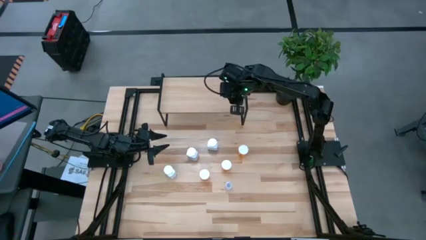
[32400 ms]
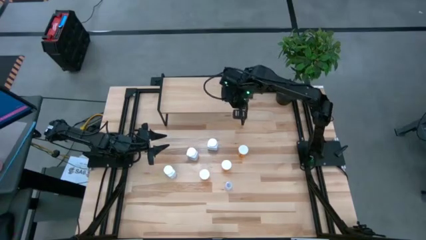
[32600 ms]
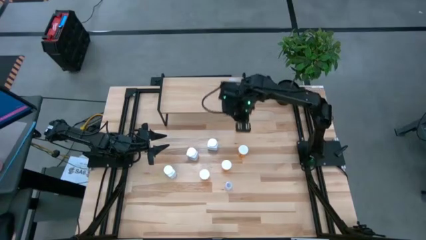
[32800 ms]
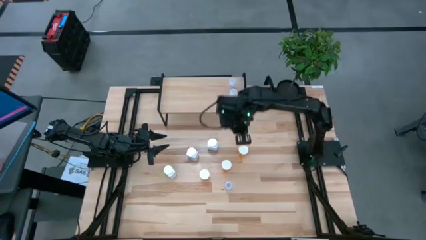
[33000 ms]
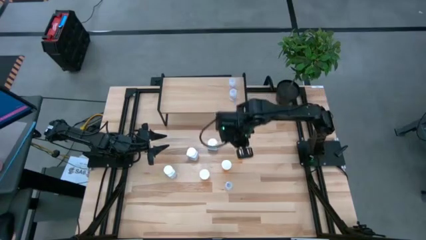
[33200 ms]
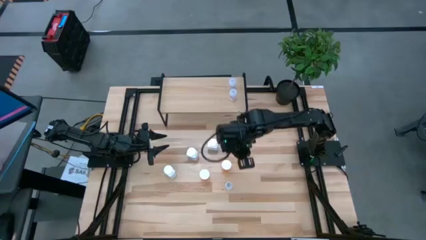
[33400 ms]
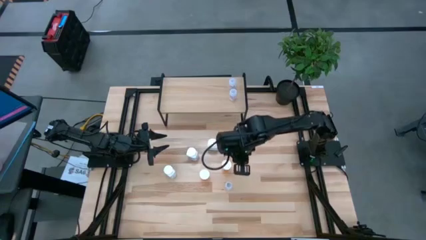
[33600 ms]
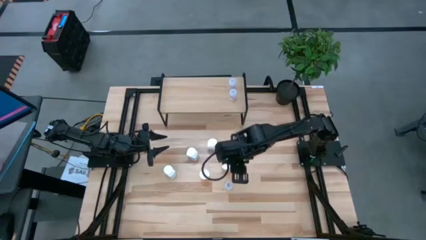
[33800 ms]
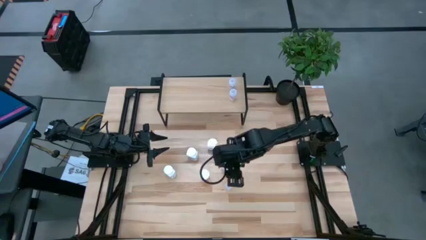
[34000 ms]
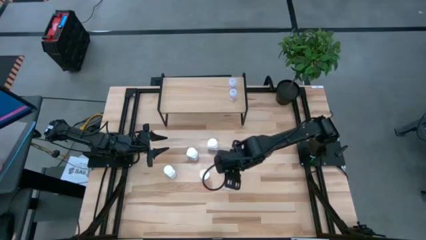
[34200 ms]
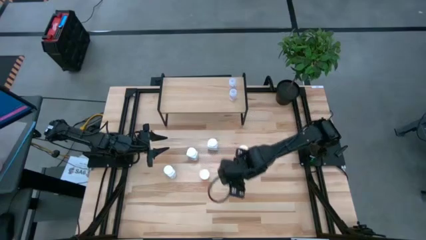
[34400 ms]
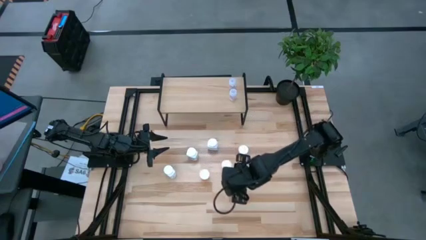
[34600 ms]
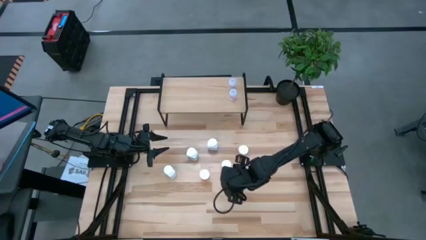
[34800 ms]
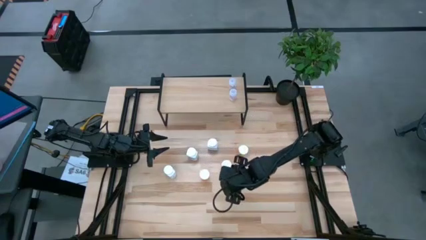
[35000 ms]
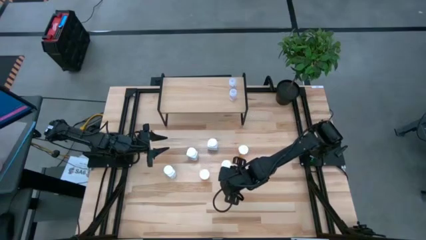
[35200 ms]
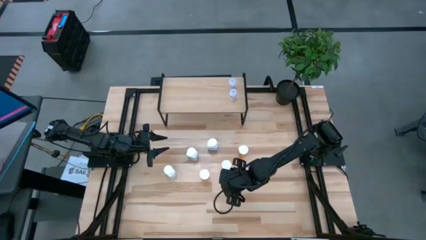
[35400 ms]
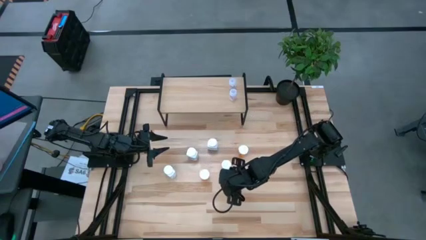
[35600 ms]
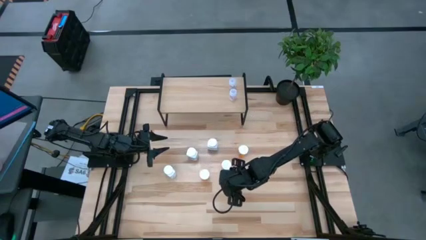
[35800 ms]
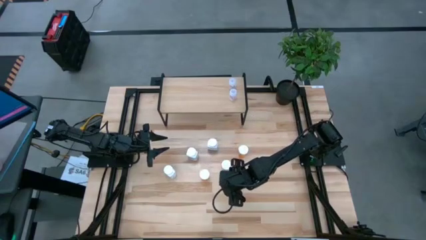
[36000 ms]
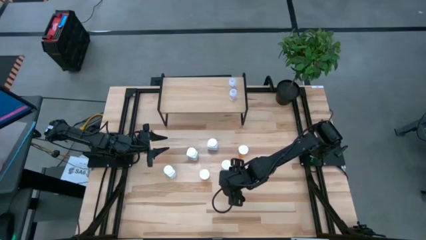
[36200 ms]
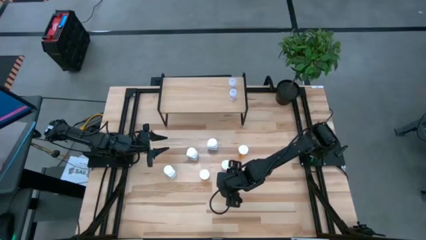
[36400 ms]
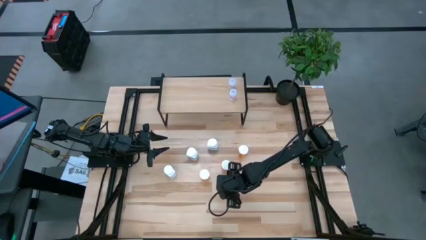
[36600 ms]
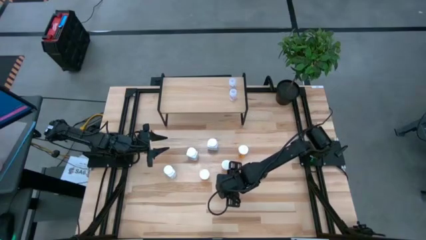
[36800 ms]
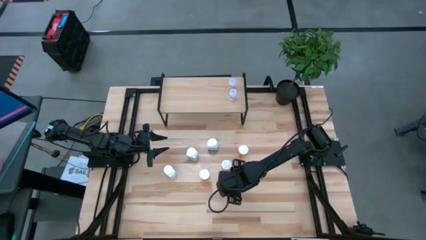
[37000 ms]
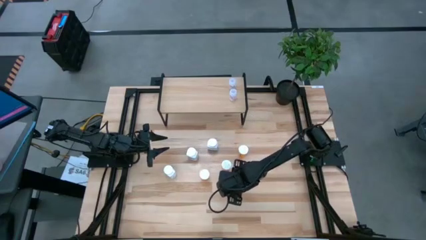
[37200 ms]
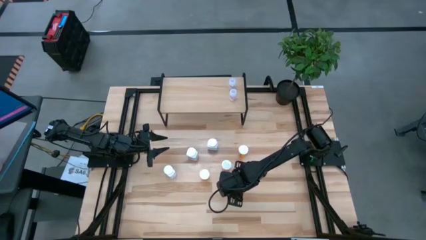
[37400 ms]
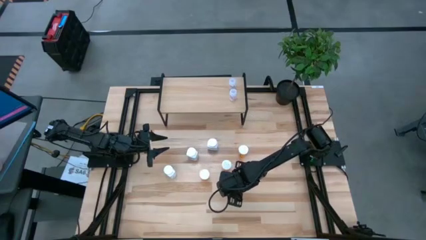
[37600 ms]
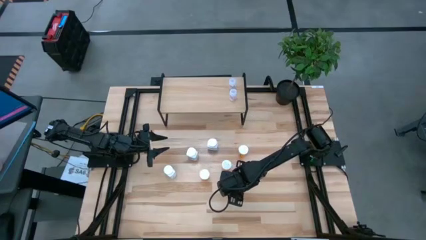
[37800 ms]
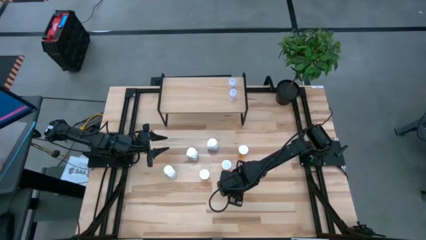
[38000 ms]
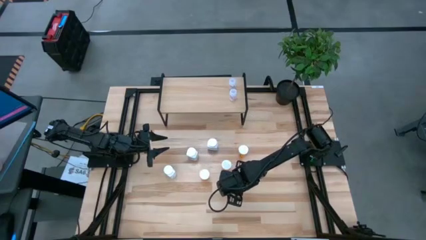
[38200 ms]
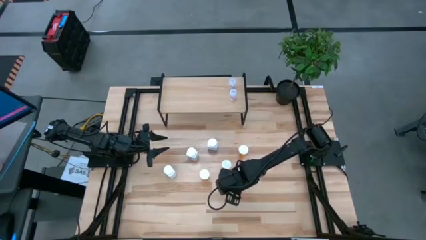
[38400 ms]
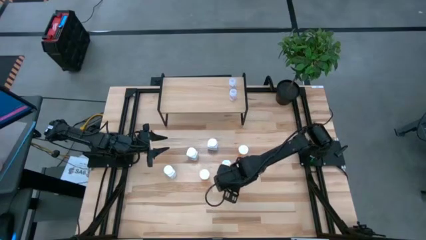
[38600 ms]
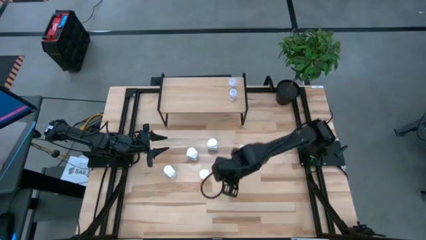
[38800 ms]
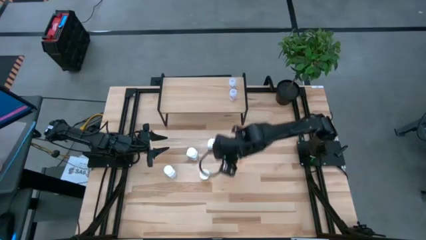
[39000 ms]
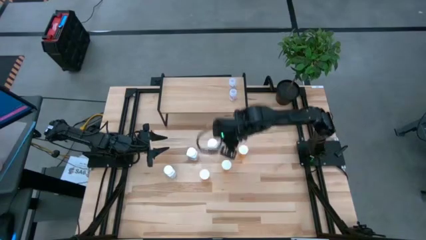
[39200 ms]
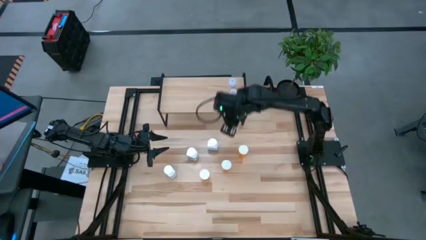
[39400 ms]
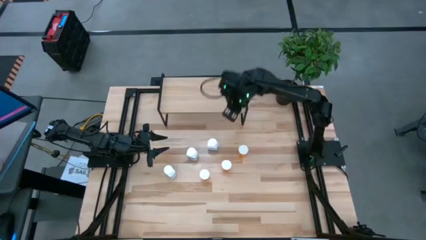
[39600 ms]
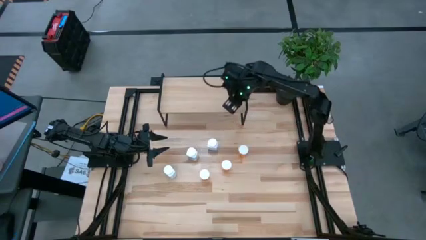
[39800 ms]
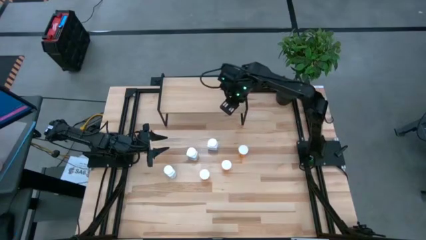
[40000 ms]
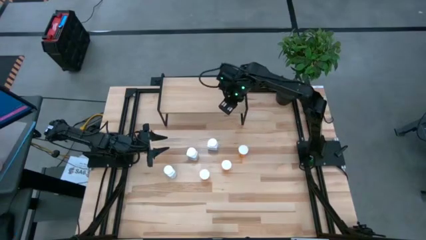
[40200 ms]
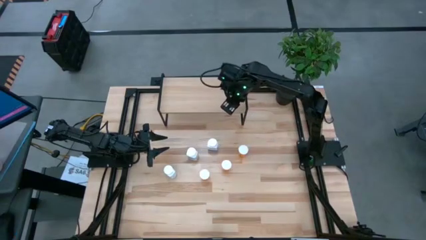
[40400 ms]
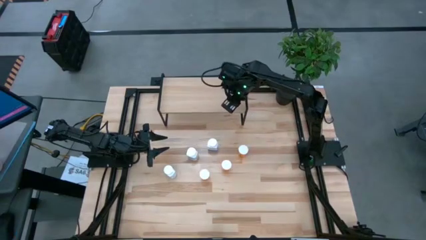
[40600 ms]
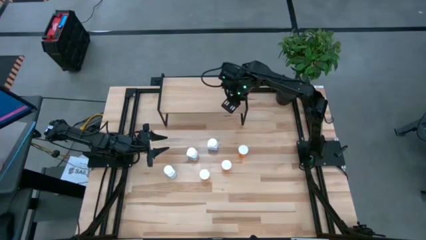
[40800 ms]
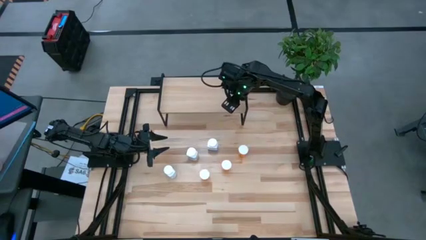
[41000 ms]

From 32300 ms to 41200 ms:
Task: Pick and place medicine bottles onto shelf by color
Put the transparent pill bottle aligned with the other transparent pill bottles on the shelf

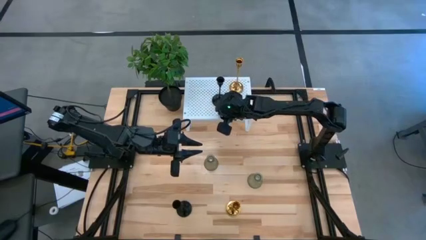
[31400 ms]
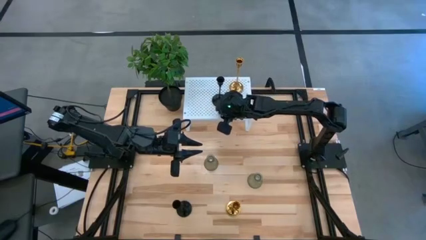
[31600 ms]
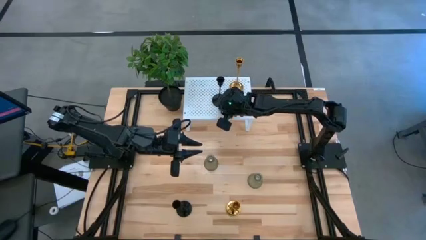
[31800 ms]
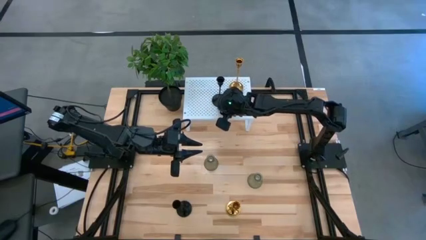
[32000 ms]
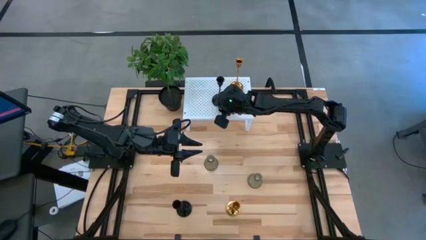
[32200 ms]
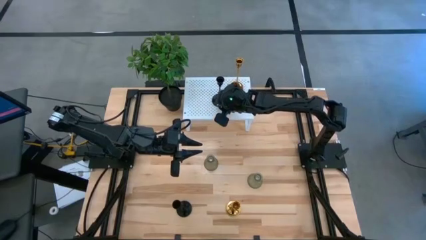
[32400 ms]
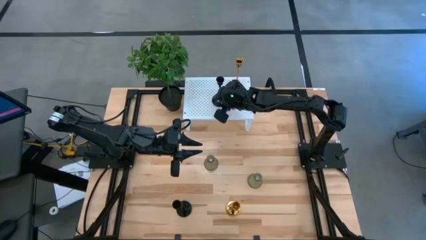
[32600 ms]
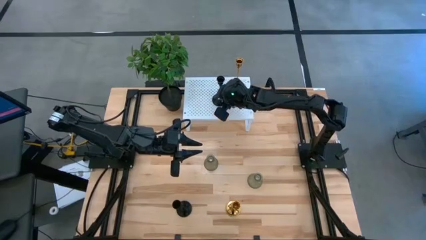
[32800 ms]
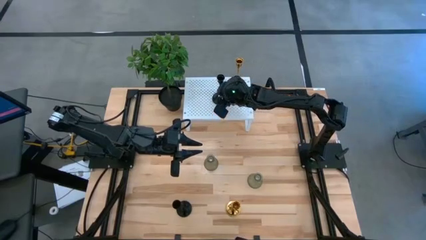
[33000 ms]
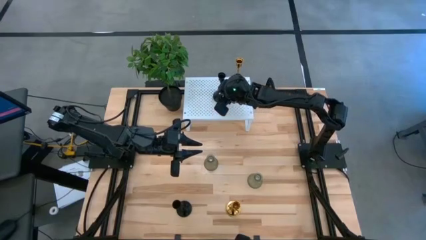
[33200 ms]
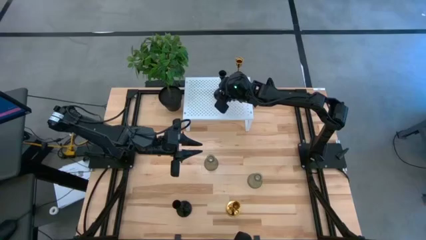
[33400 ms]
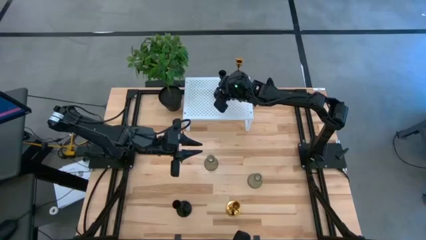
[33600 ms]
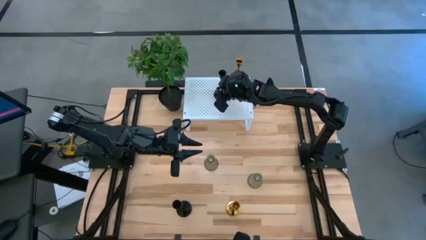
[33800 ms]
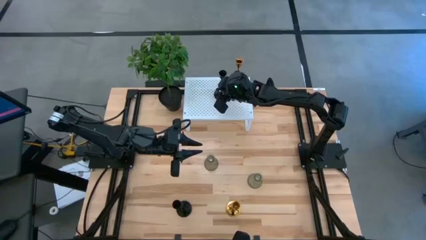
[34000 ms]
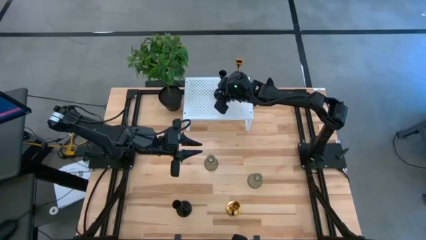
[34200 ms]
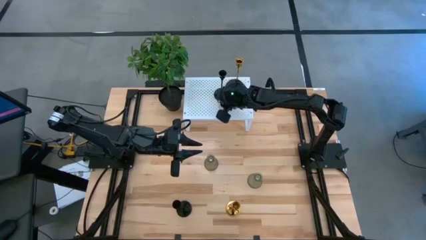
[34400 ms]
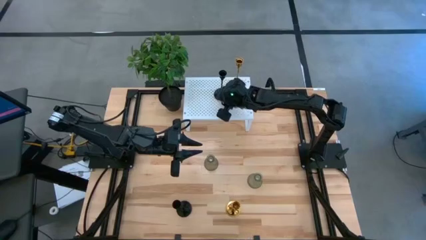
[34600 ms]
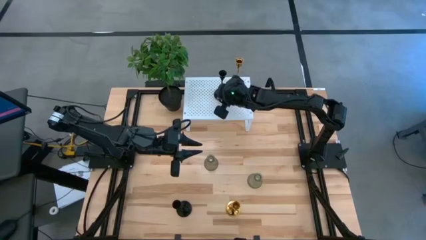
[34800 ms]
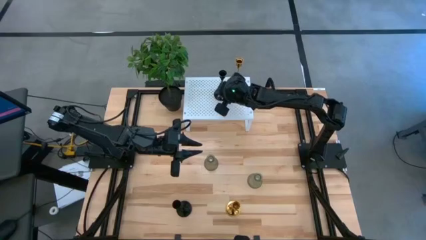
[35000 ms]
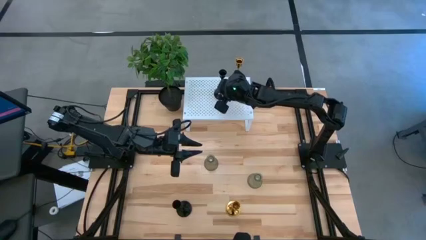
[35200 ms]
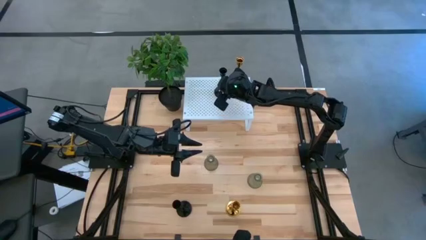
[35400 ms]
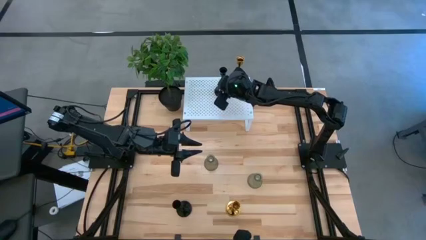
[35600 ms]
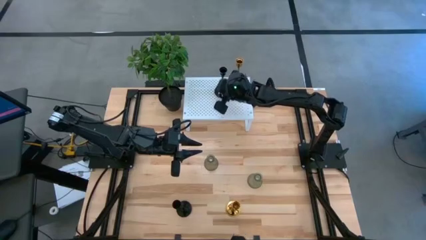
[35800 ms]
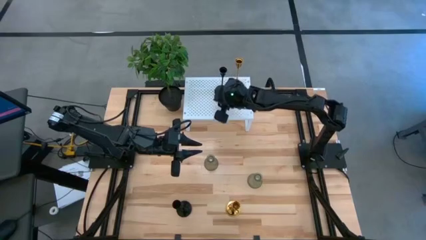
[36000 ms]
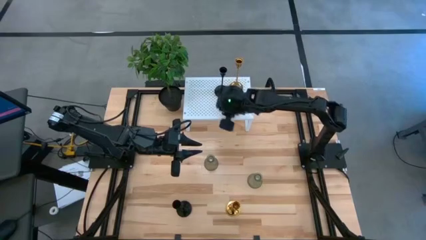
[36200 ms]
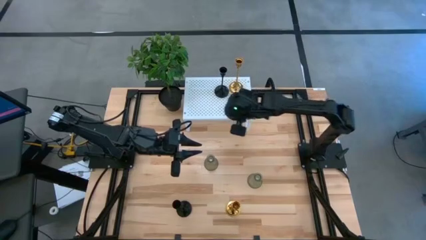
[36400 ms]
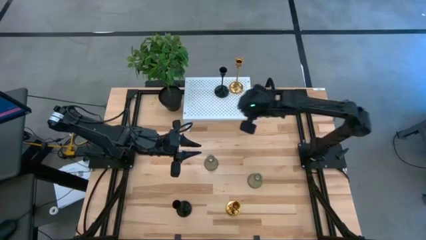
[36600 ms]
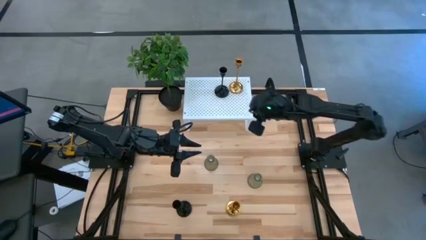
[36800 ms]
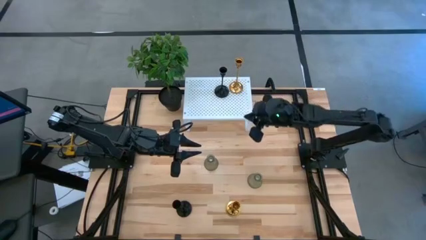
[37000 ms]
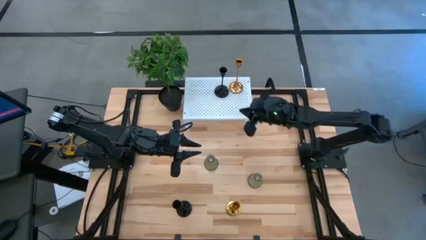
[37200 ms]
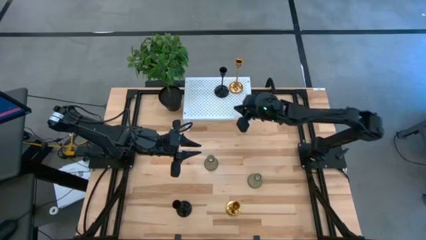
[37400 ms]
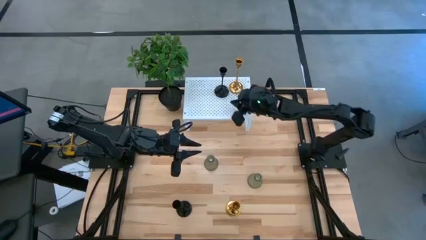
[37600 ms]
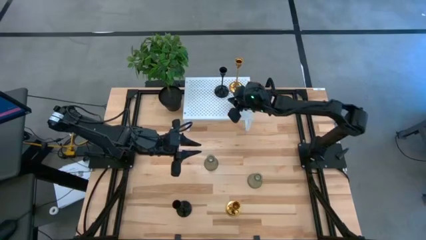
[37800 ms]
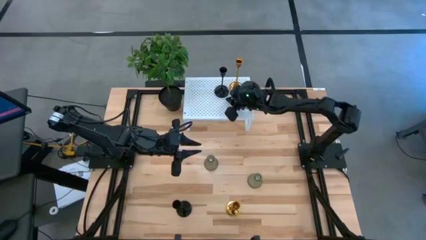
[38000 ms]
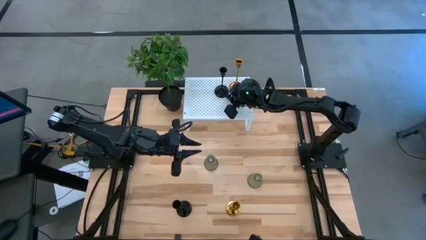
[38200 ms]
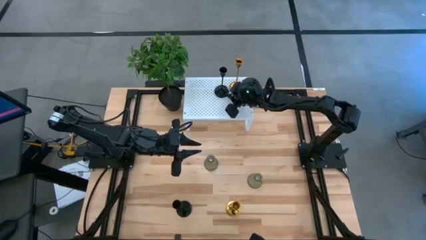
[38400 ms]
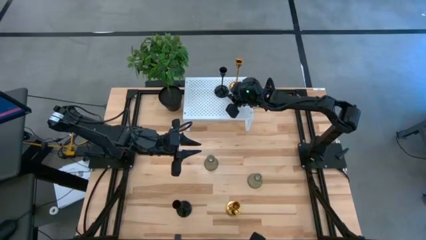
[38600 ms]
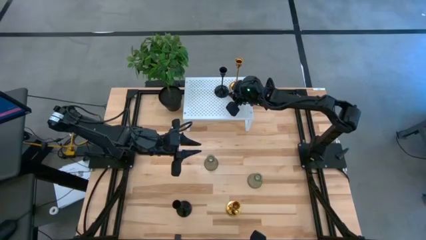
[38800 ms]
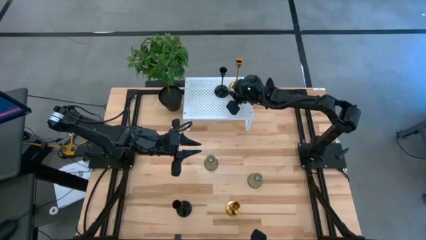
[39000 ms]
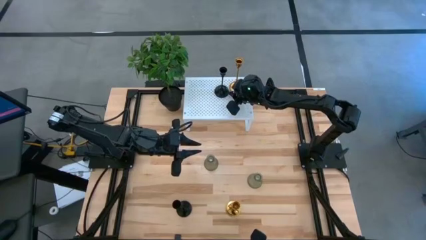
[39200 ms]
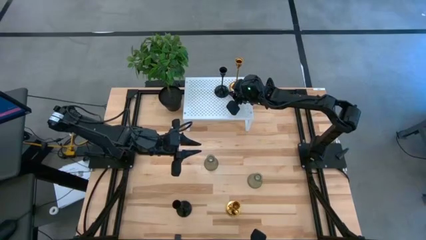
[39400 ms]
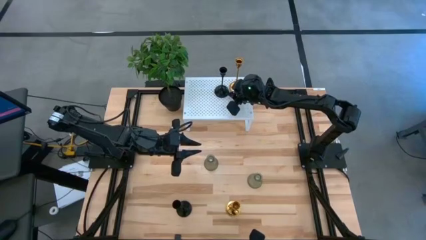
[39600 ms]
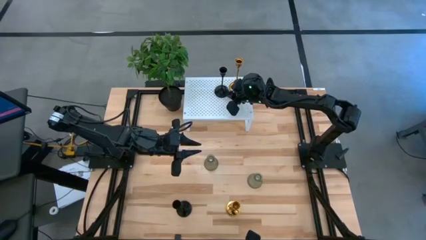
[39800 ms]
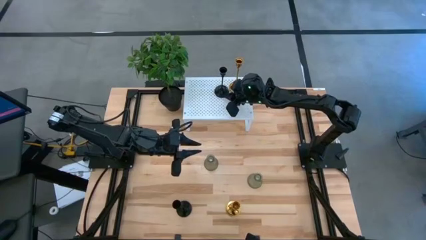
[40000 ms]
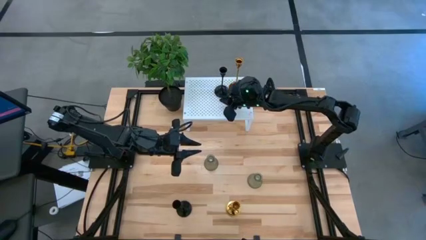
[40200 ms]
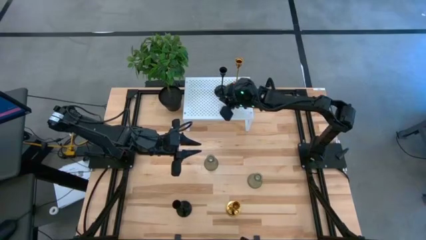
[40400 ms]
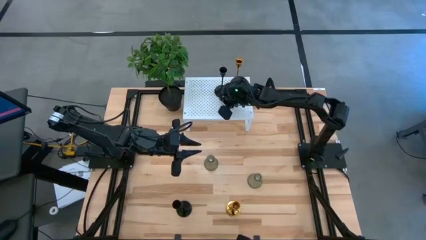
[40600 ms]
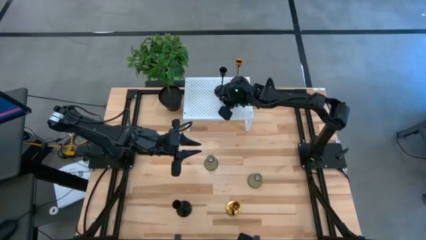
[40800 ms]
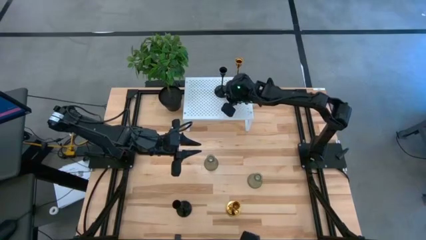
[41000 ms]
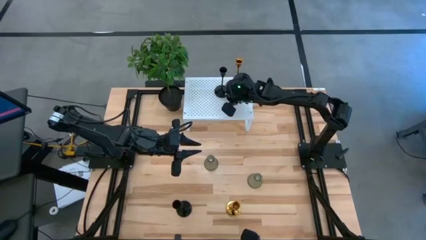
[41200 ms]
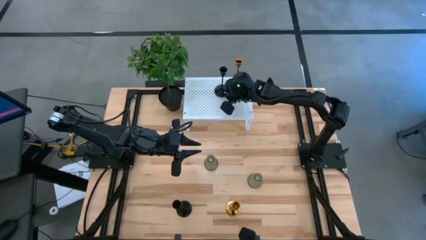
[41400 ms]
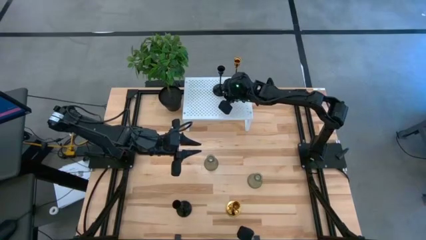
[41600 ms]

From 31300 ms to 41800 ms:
Task: Pick & Place candle stick holders
Put the top black candle holder on the shelf
